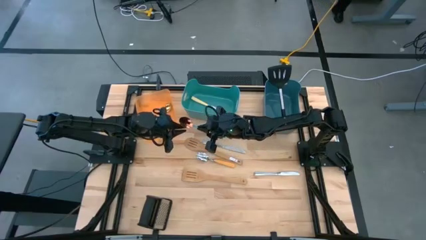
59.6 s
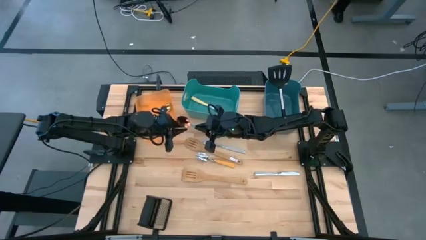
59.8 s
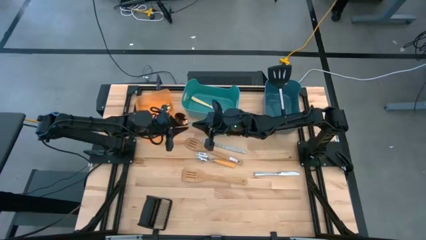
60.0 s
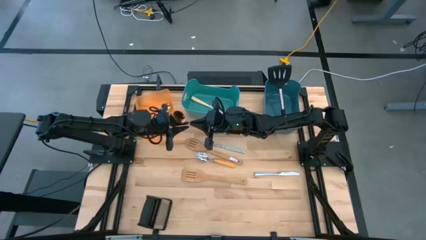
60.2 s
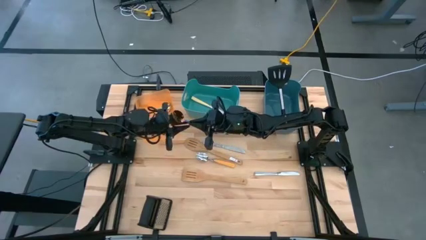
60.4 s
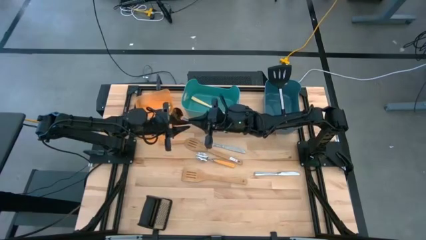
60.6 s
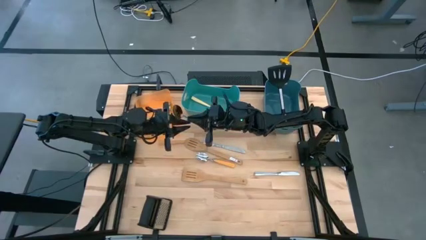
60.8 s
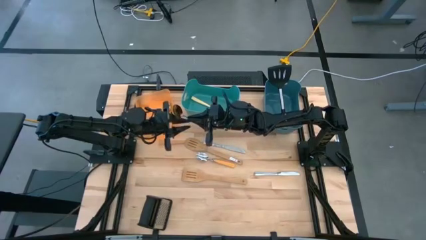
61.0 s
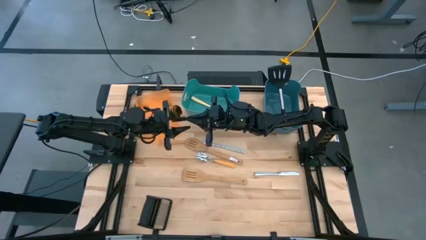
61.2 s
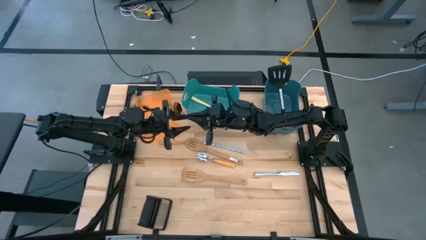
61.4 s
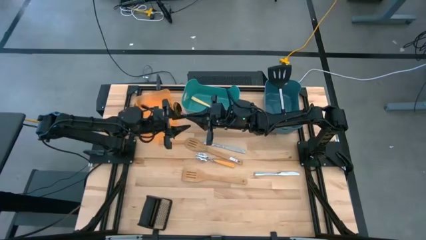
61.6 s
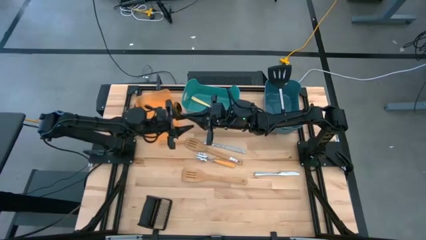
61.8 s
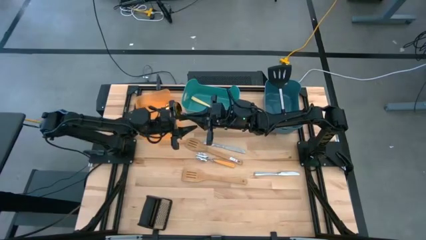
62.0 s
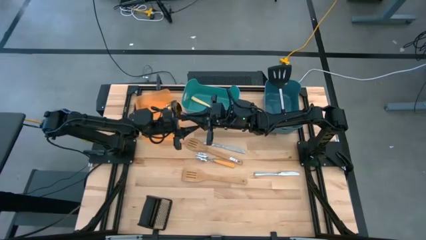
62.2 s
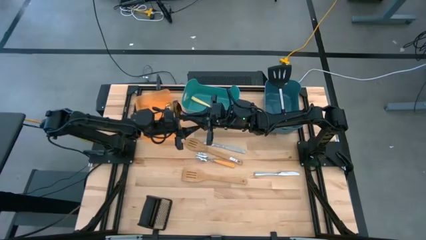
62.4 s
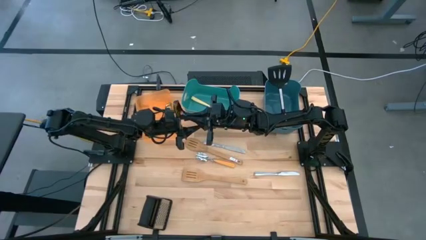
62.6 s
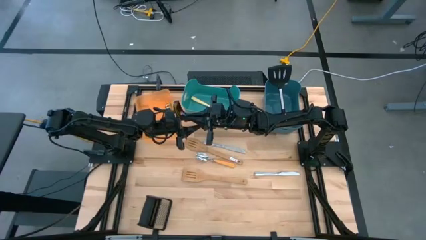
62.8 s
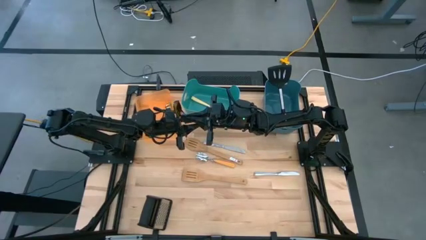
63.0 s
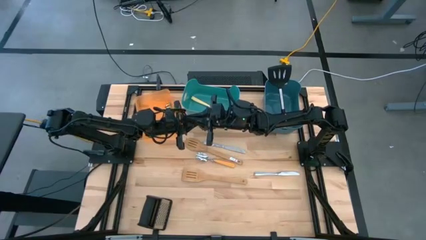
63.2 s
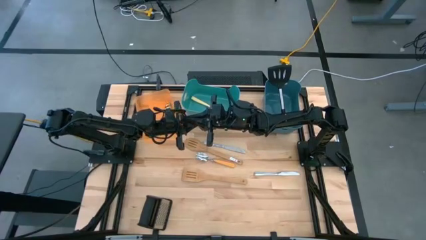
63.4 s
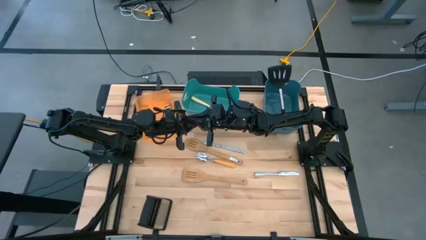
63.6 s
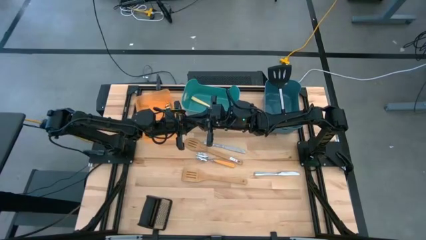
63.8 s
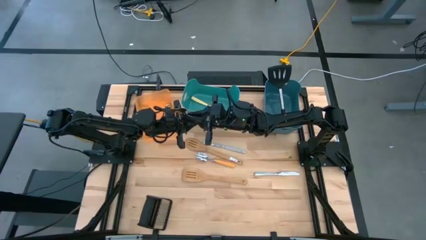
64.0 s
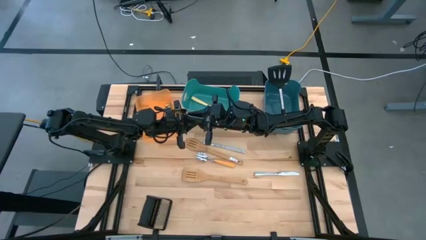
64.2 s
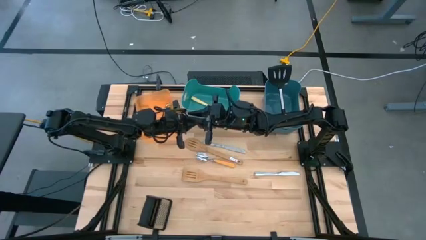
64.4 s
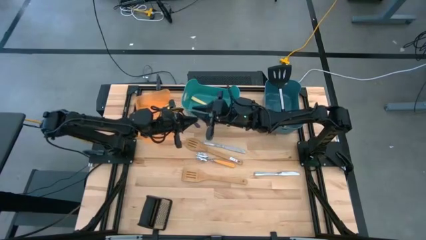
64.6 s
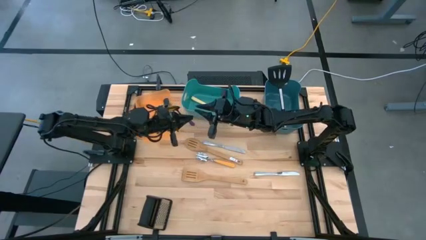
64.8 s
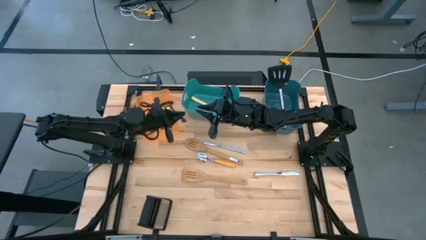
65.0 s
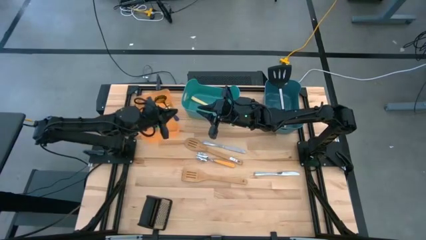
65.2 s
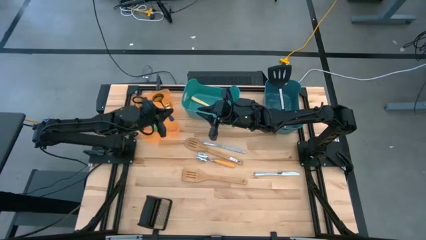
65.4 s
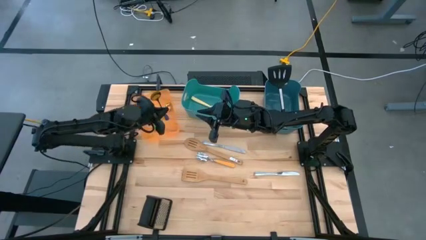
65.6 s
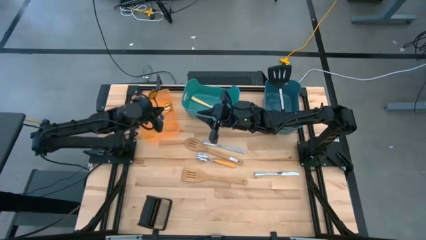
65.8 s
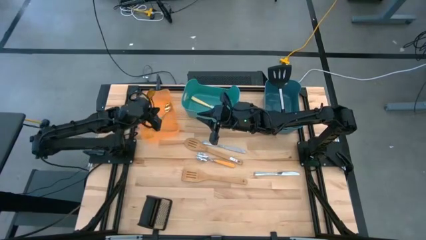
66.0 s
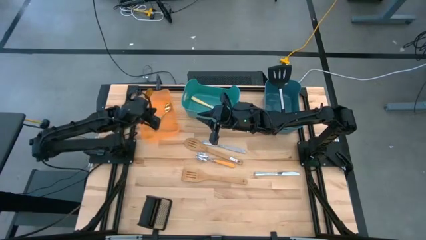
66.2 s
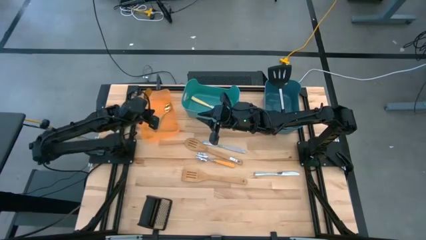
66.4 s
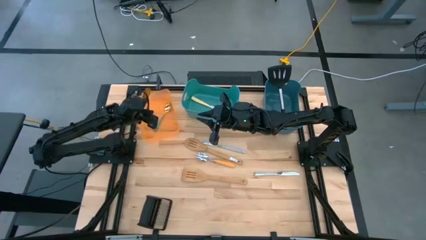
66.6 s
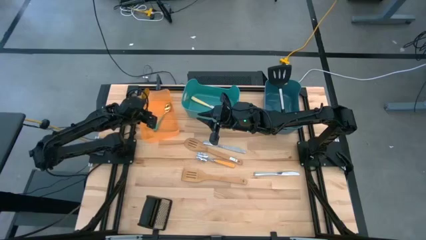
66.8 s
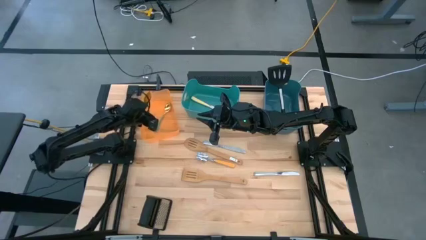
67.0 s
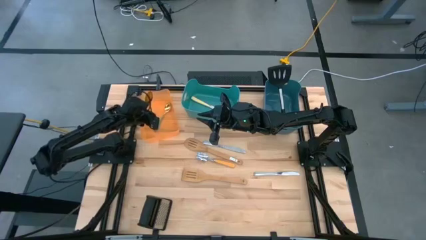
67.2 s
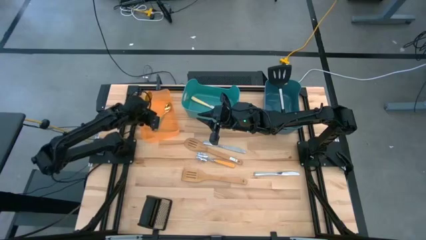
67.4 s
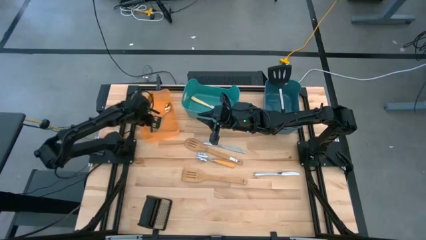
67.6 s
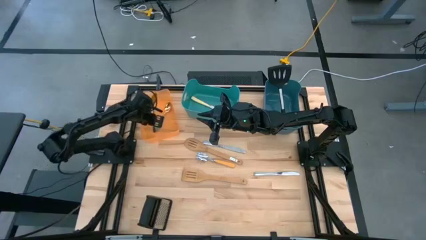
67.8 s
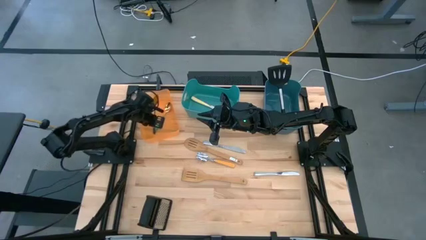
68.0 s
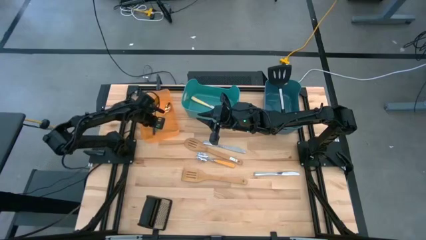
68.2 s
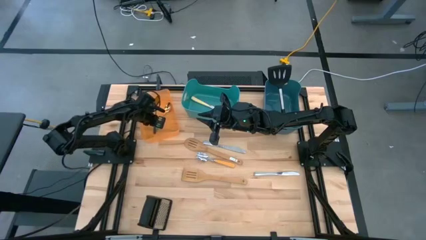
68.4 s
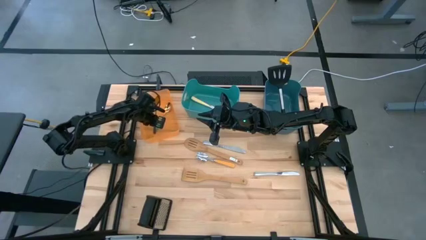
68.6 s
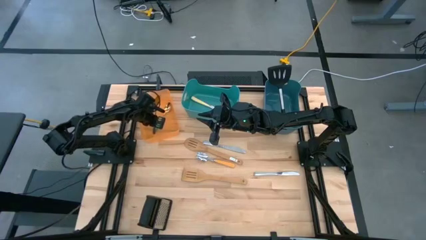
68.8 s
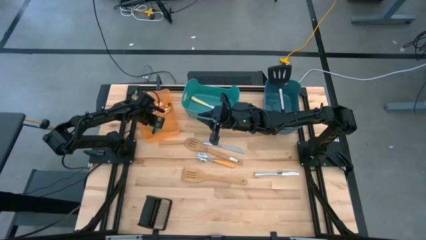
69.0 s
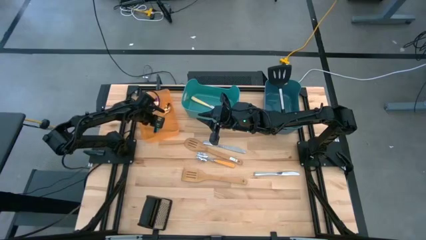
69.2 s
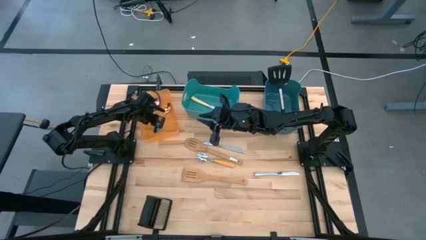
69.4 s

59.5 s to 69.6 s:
Task: Pick & Place Kitchen Items
Put the purple spoon into the orange bin

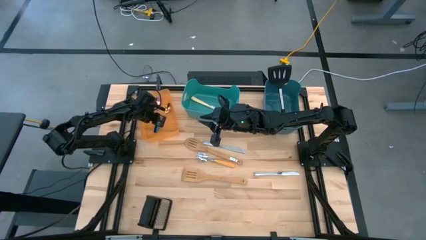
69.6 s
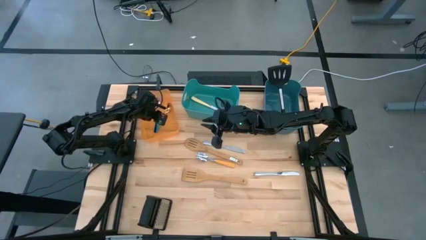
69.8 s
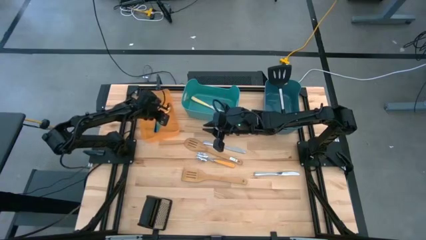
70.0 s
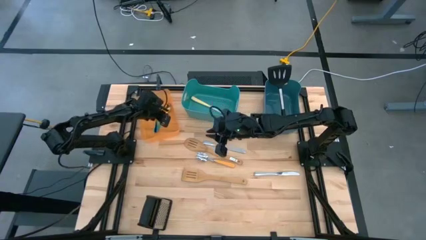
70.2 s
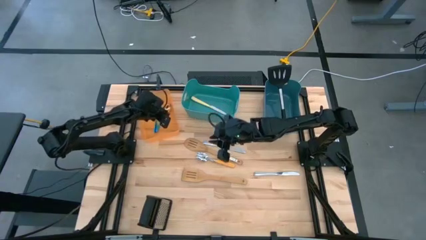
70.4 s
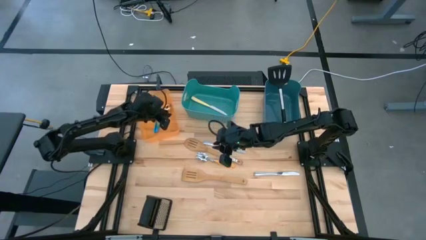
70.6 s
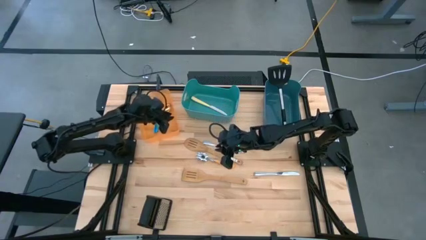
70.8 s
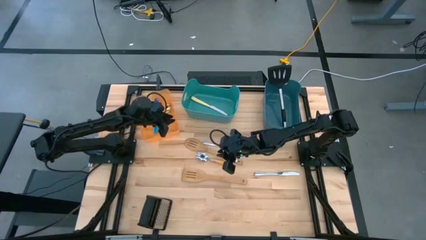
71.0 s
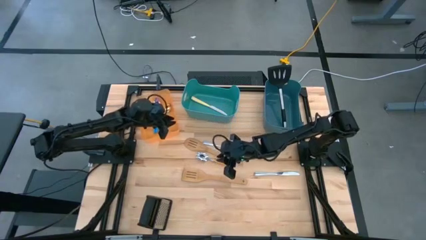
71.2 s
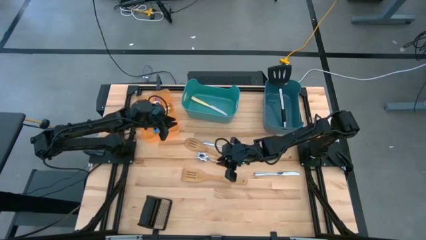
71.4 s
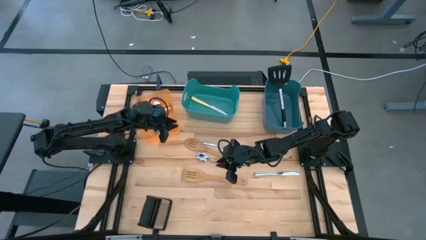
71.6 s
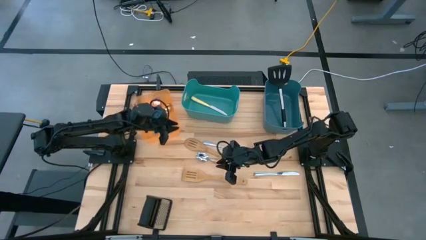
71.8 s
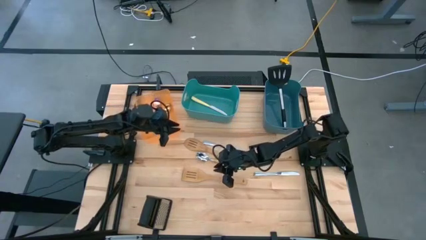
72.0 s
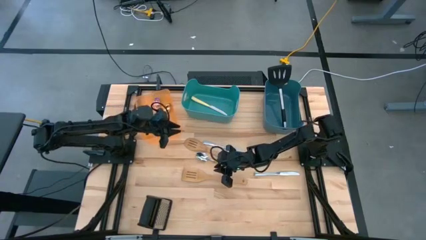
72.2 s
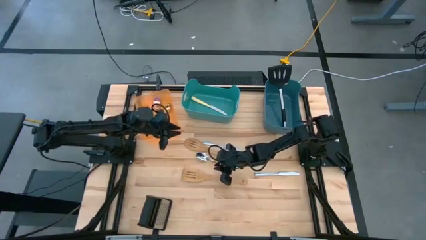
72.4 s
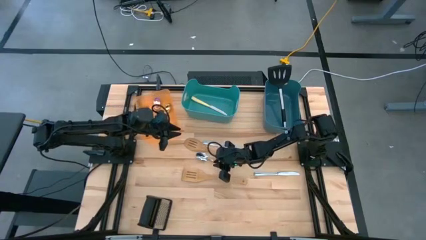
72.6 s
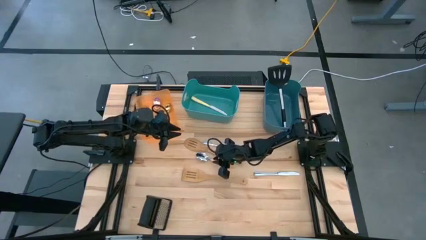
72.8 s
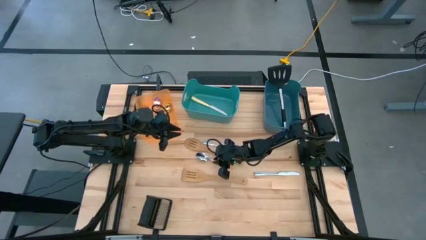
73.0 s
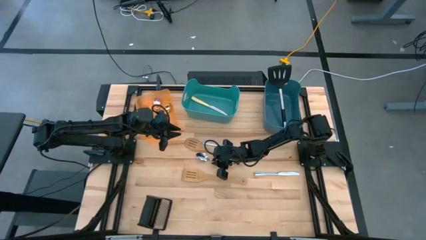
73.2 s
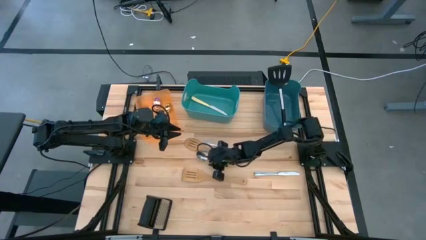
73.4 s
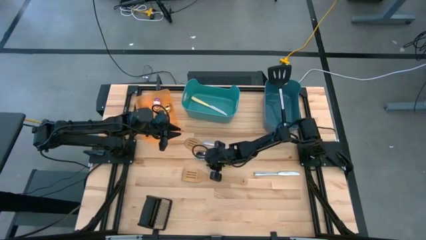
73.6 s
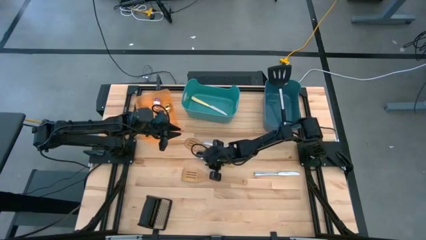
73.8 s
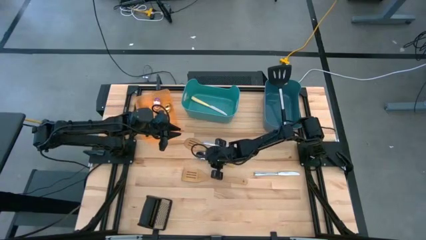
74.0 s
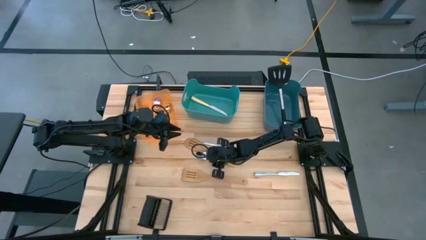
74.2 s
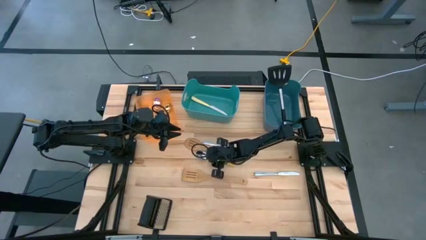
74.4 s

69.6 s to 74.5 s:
Put the yellow spoon into the orange bin
